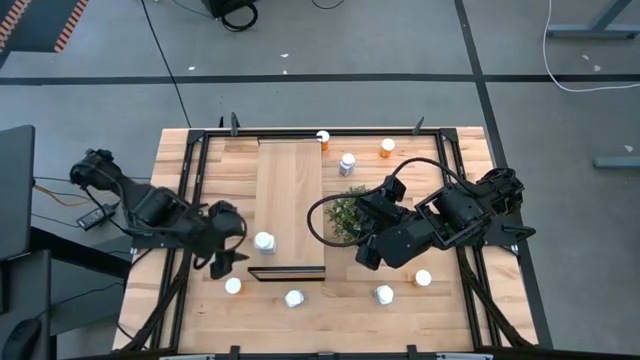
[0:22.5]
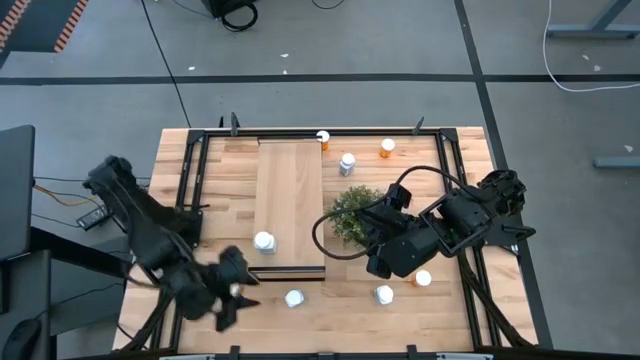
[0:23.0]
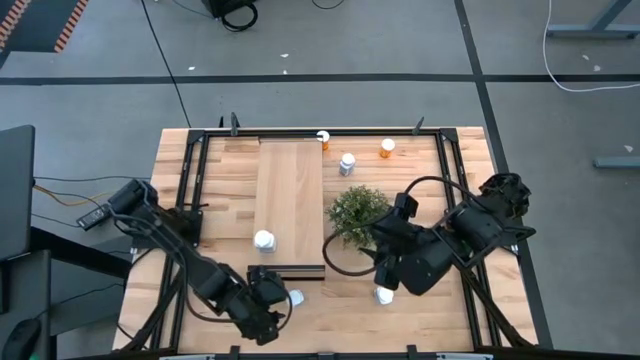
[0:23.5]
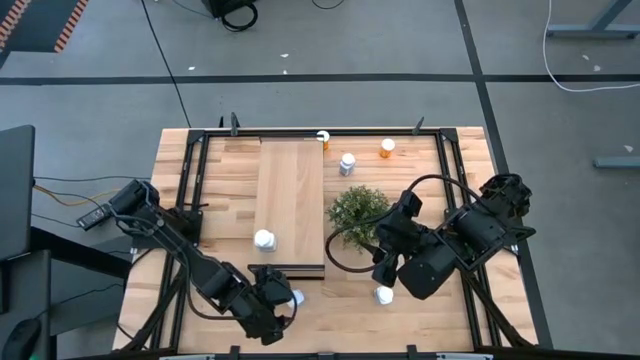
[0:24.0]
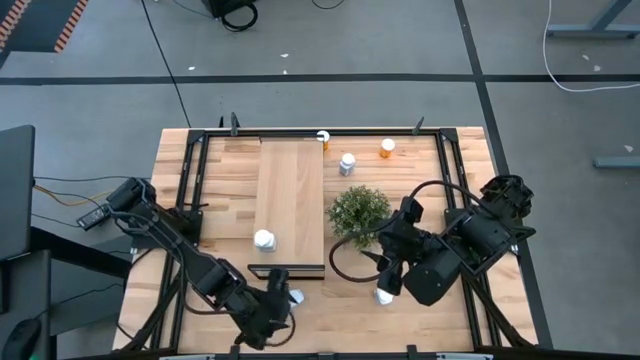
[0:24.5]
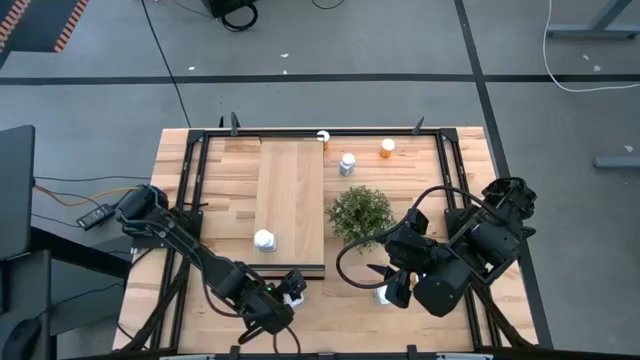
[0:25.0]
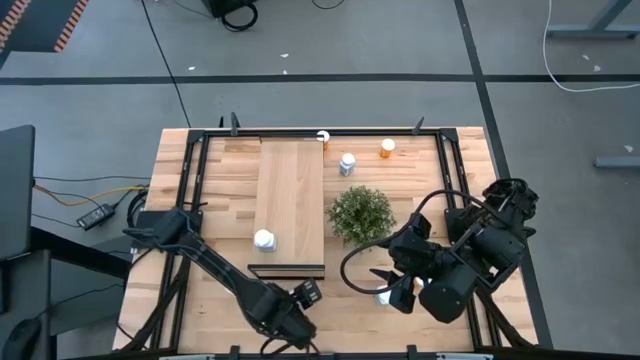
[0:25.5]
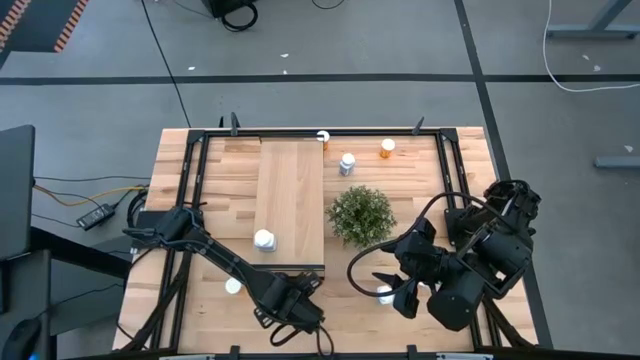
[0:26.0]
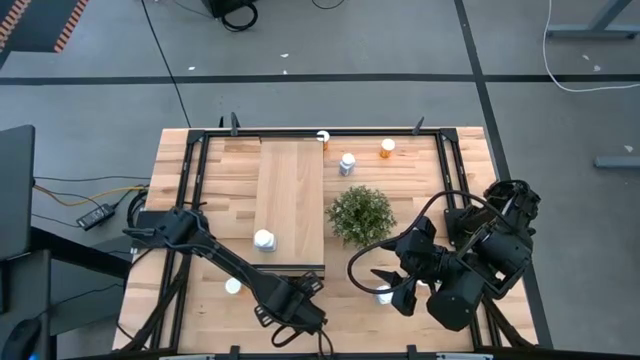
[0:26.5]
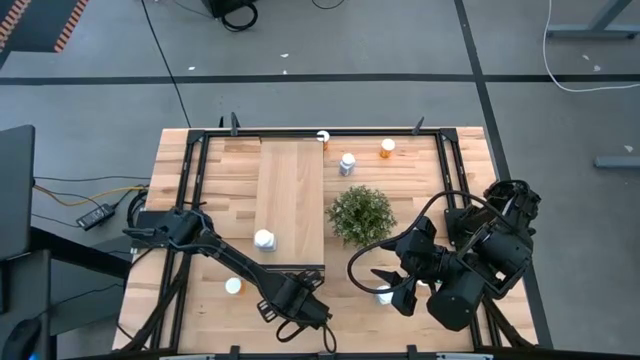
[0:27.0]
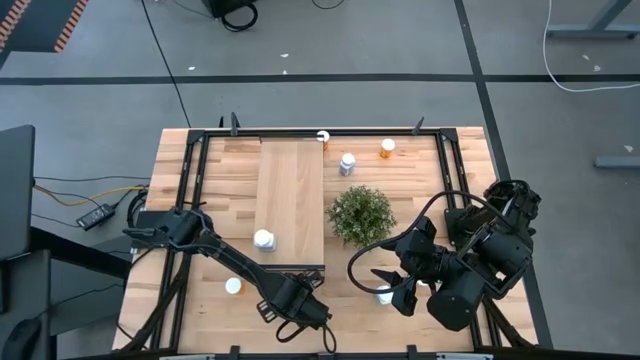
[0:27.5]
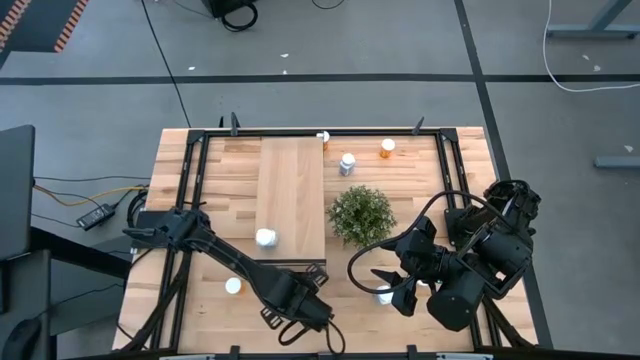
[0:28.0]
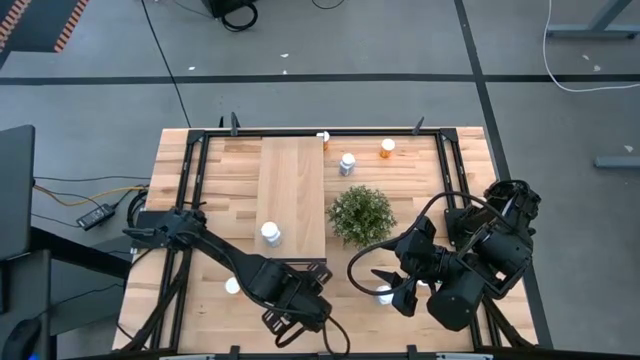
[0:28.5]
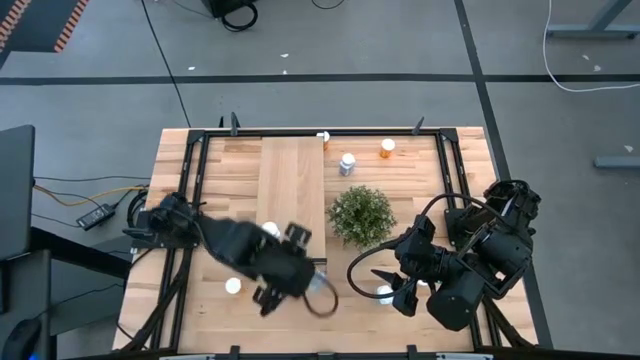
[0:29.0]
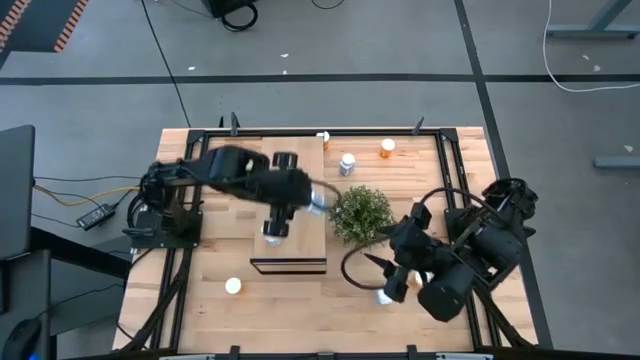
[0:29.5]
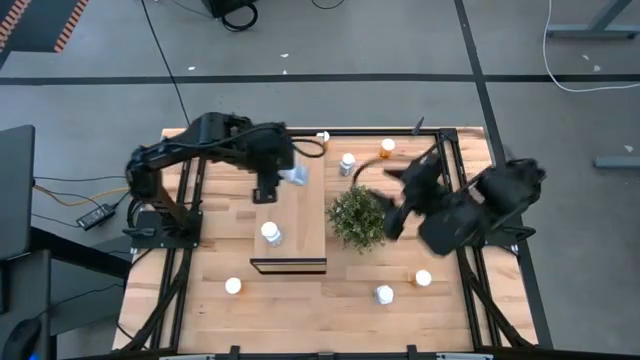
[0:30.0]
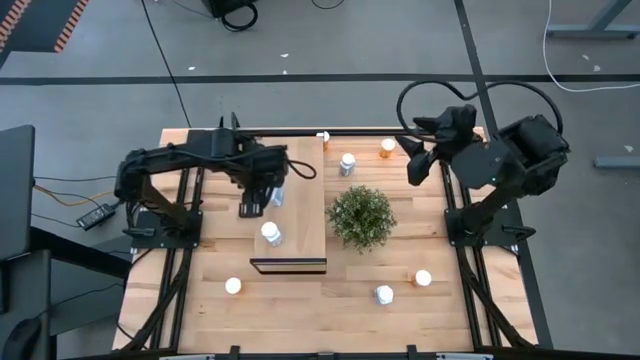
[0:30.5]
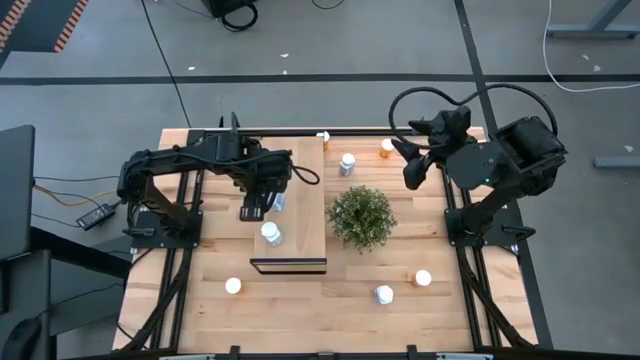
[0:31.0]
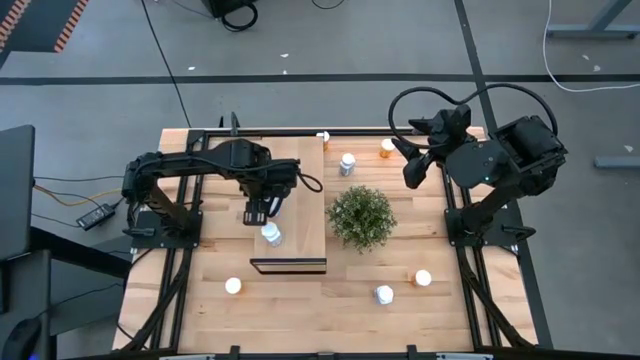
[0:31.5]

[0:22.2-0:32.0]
Task: Pick and place medicine bottles onto shelf by color
Put the bottom left white pill bottle on the shelf aligned with the other white pill bottle

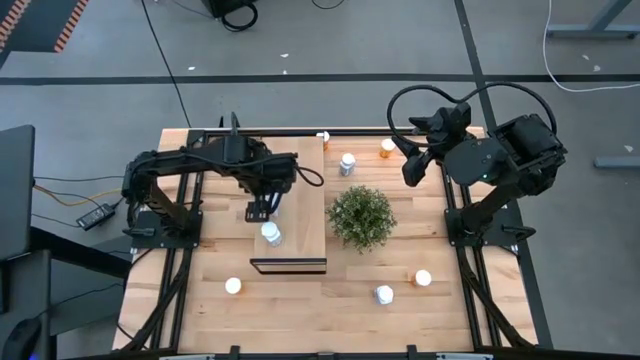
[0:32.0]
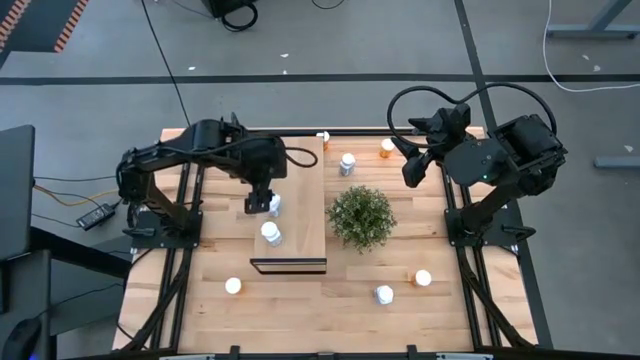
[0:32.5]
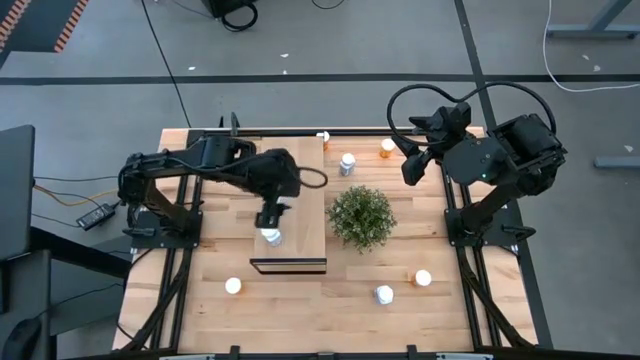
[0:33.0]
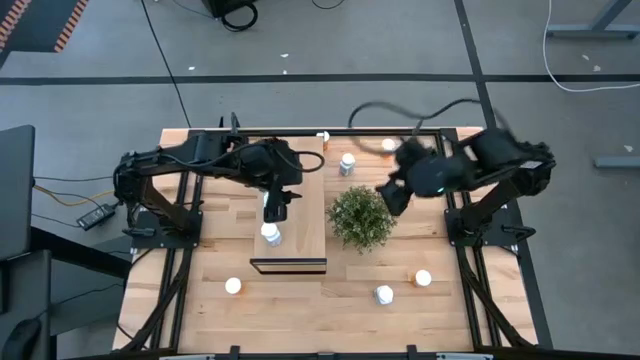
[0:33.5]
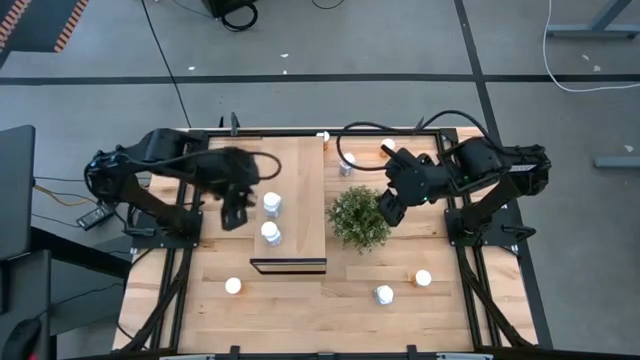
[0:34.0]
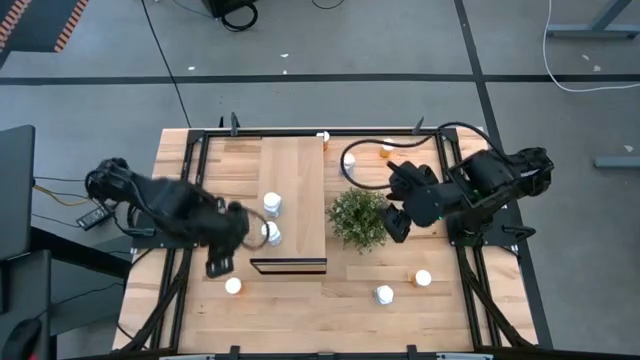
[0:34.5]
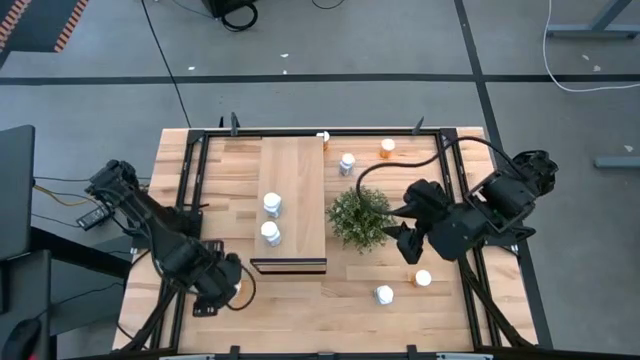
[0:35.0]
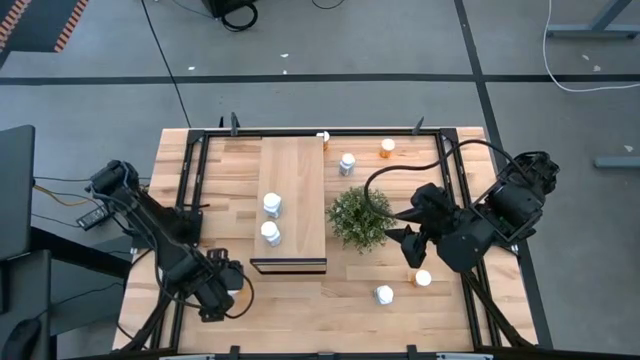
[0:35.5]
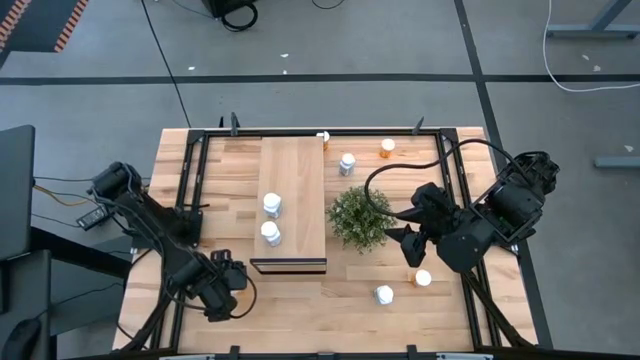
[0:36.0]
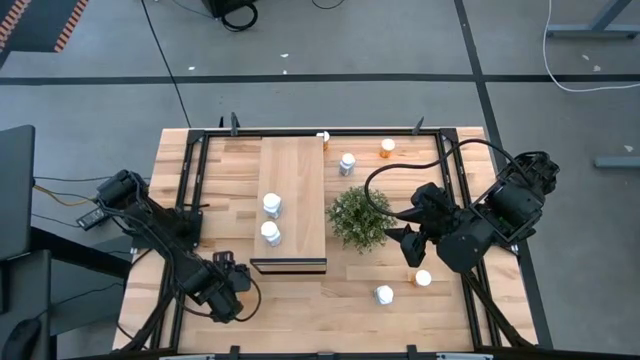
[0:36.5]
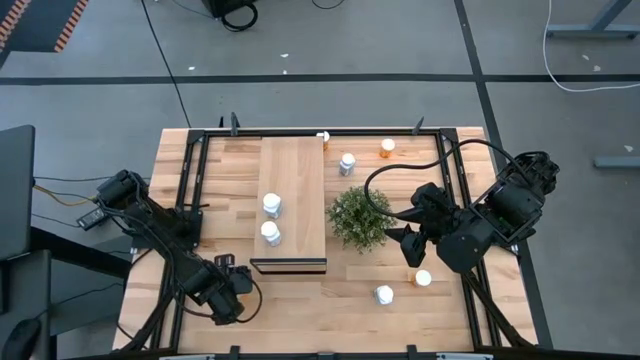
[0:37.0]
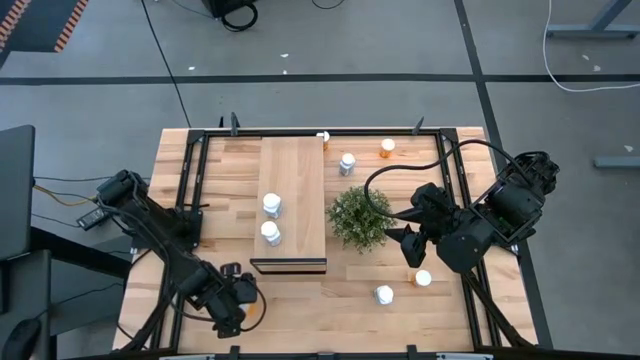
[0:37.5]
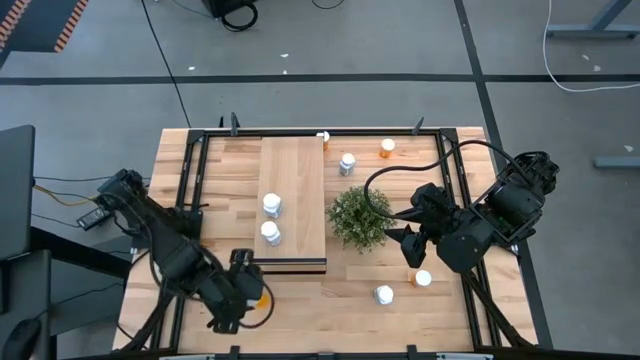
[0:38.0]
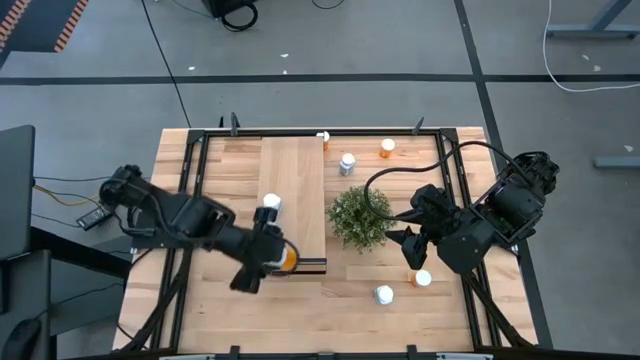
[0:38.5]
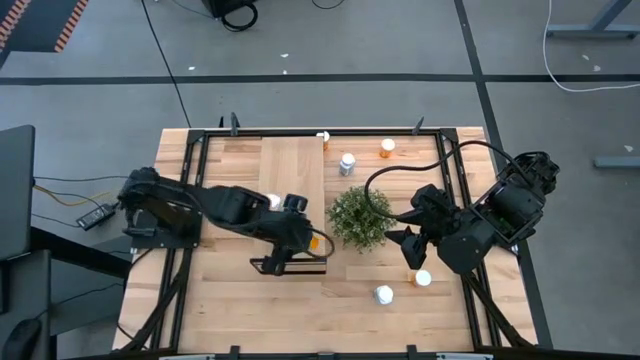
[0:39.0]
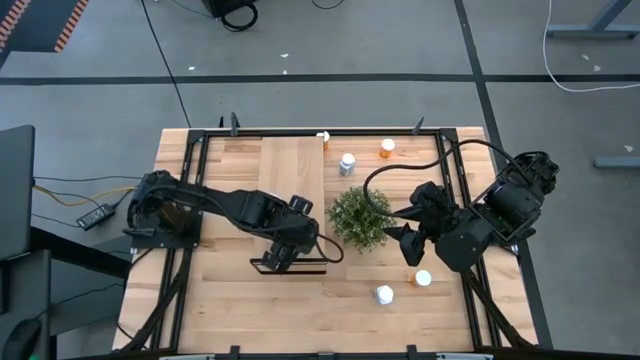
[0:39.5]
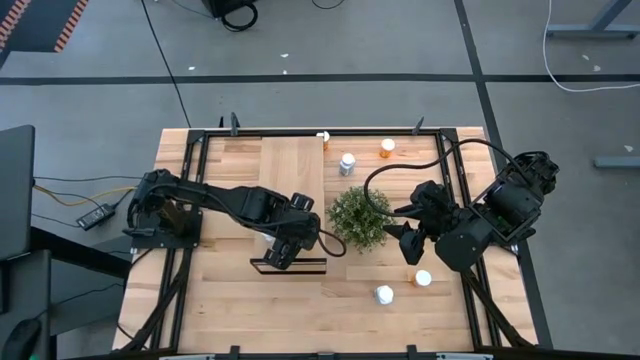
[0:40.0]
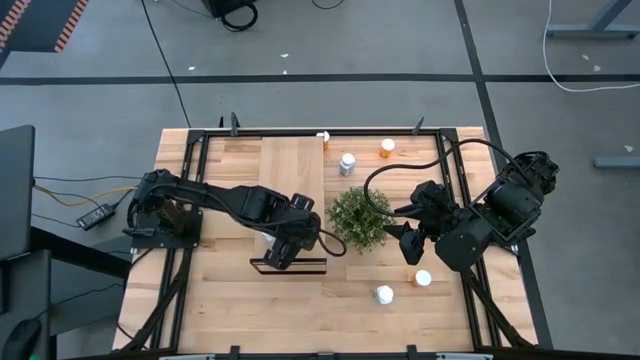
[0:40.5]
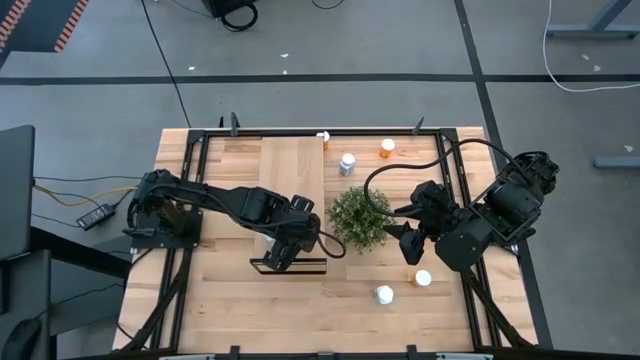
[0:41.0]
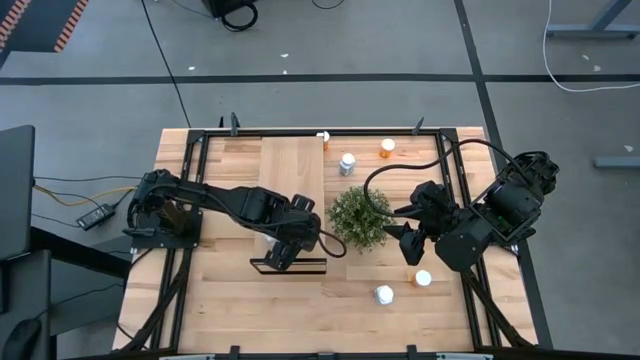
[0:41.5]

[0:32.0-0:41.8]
Put the bottom left orange pill bottle on the shelf

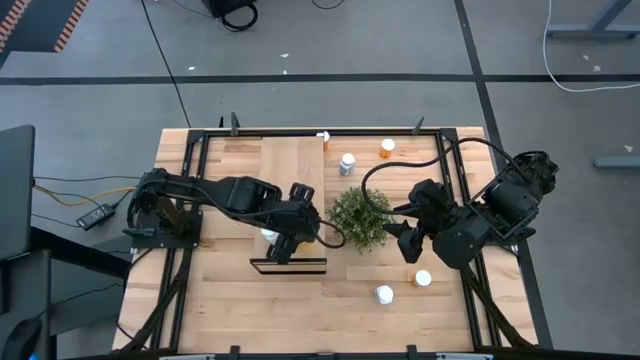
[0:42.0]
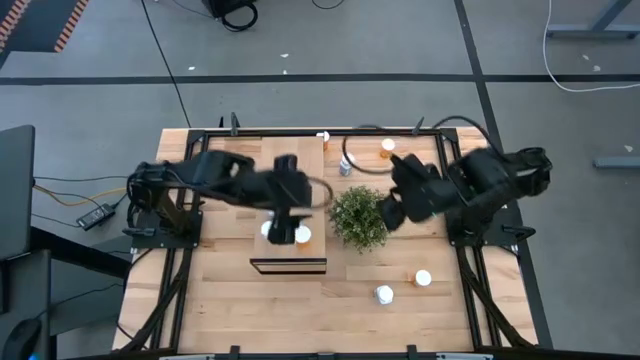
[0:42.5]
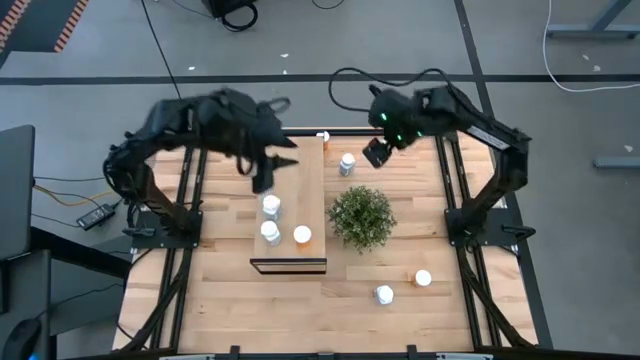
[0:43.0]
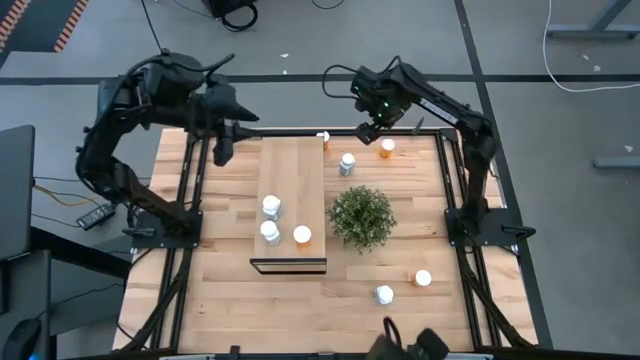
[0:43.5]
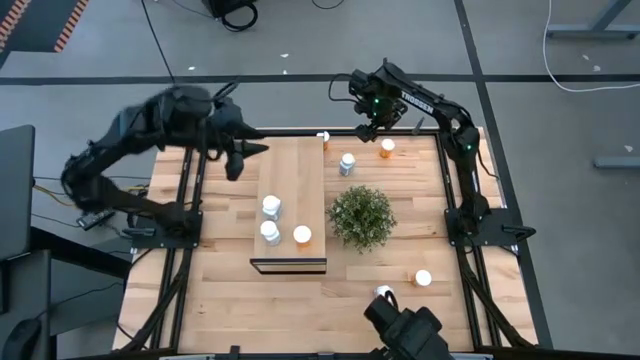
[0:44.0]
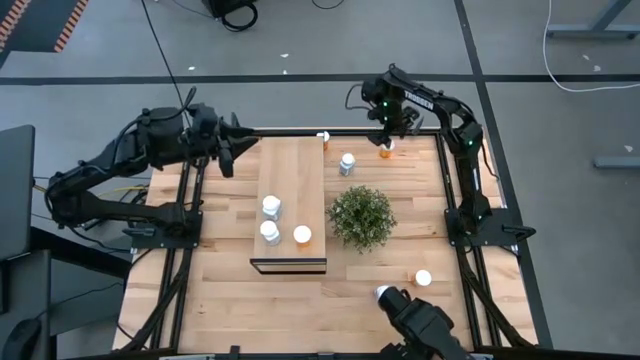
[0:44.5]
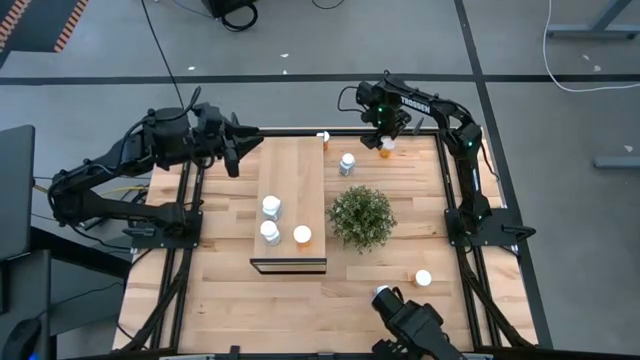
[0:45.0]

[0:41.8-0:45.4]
Put the top right orange pill bottle on the shelf aligned with the other orange pill bottle
